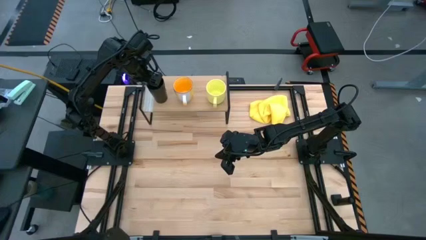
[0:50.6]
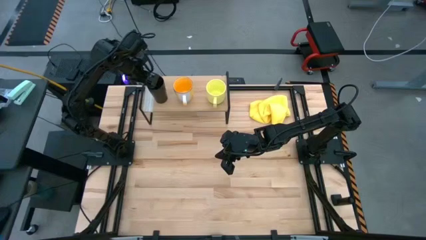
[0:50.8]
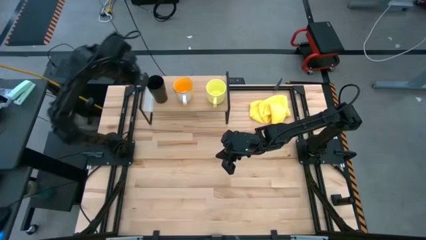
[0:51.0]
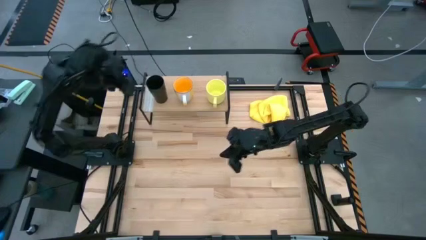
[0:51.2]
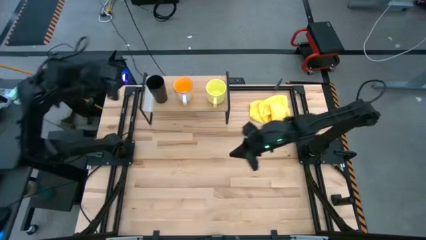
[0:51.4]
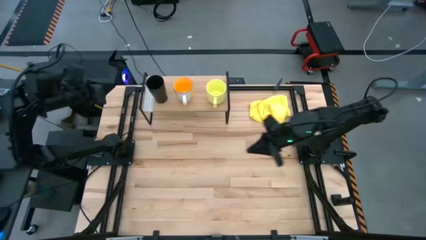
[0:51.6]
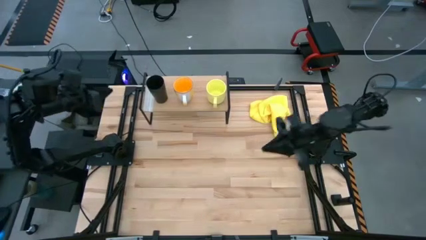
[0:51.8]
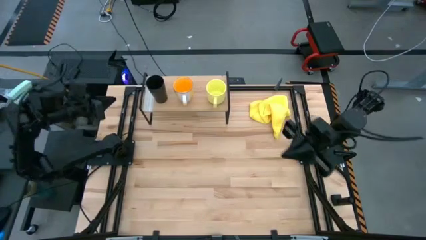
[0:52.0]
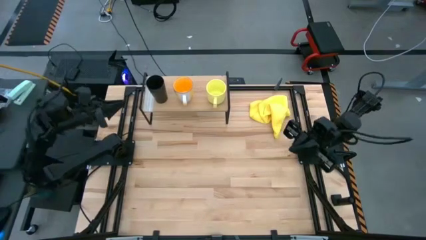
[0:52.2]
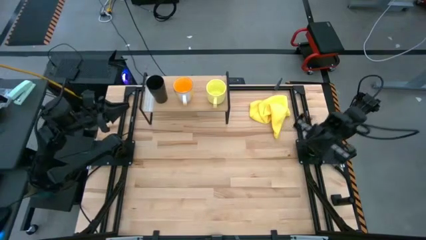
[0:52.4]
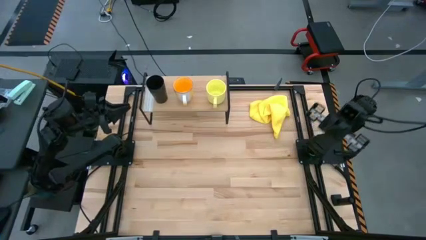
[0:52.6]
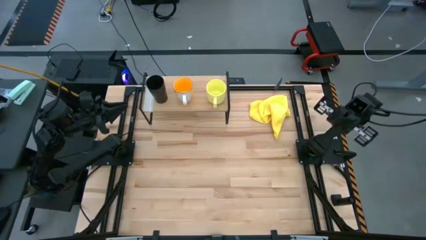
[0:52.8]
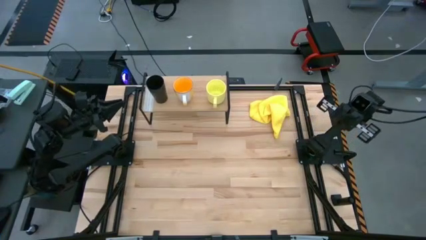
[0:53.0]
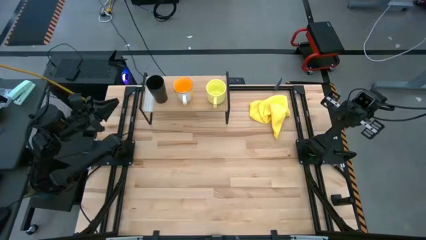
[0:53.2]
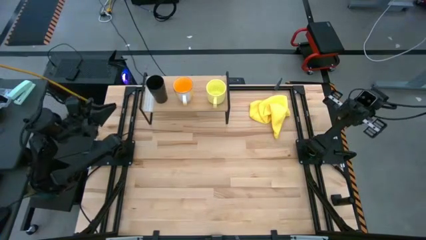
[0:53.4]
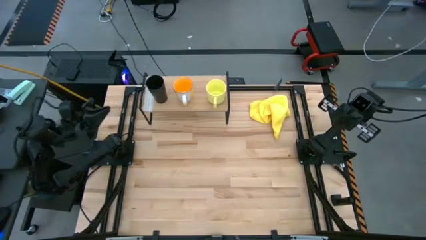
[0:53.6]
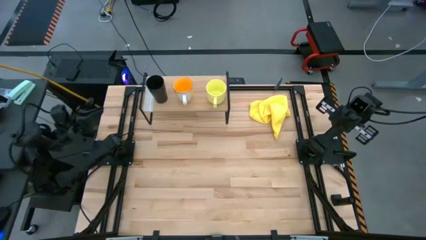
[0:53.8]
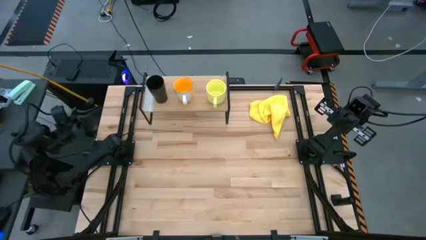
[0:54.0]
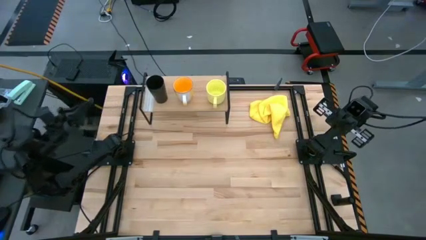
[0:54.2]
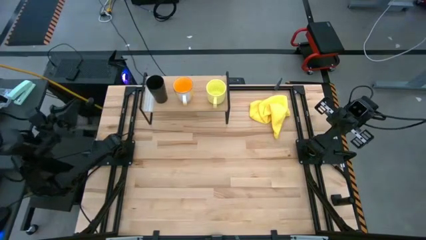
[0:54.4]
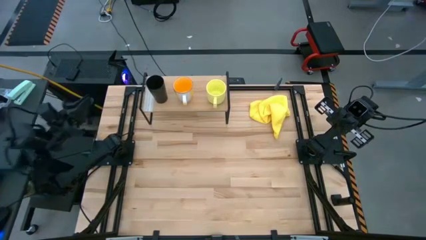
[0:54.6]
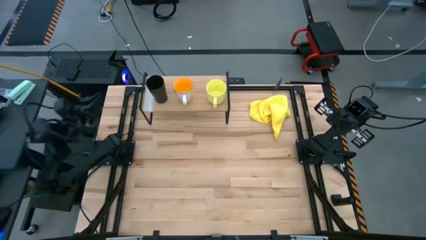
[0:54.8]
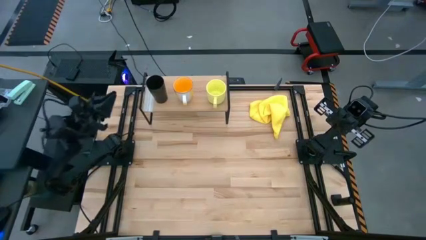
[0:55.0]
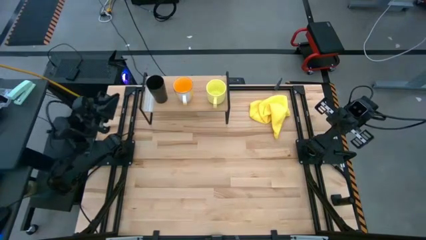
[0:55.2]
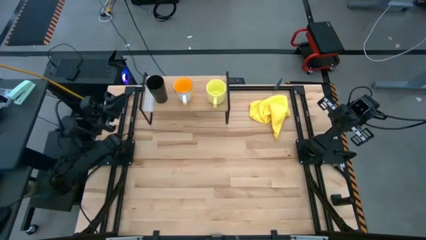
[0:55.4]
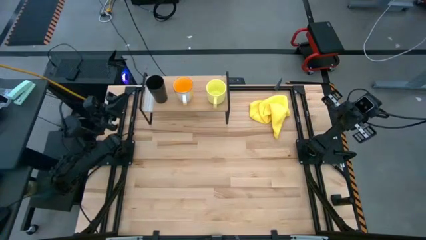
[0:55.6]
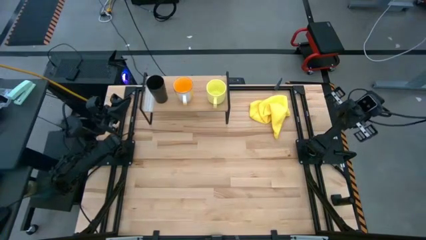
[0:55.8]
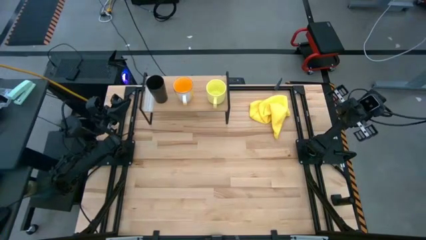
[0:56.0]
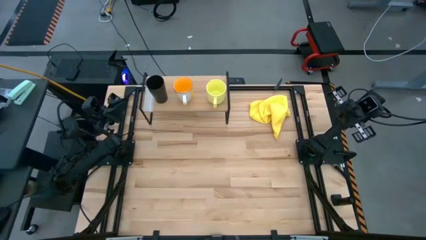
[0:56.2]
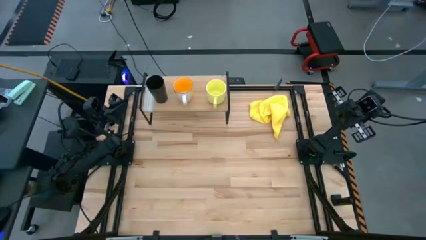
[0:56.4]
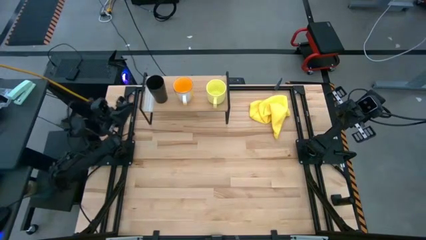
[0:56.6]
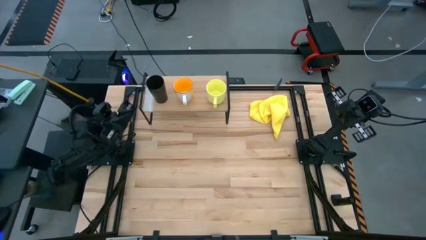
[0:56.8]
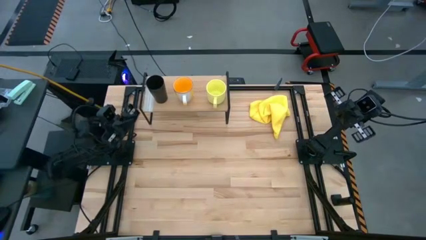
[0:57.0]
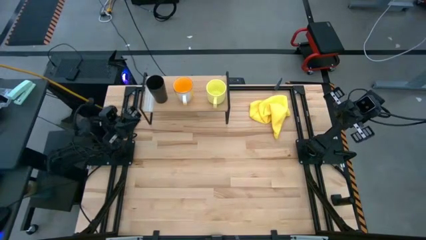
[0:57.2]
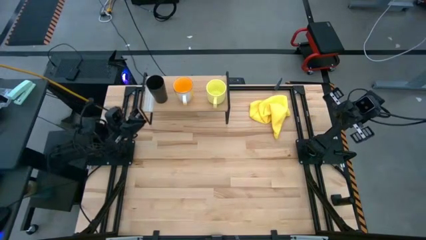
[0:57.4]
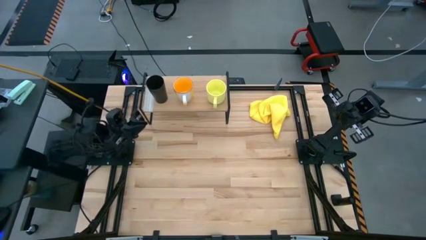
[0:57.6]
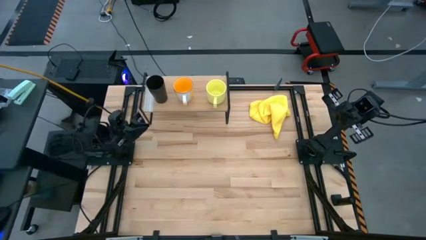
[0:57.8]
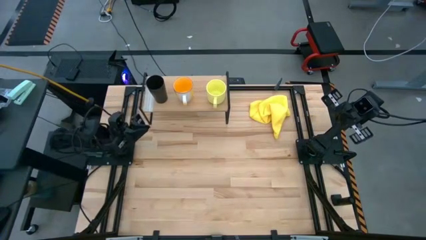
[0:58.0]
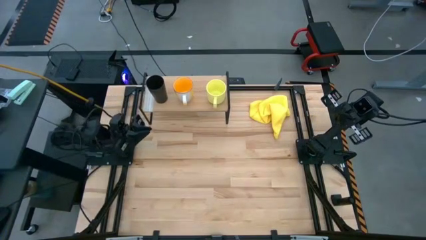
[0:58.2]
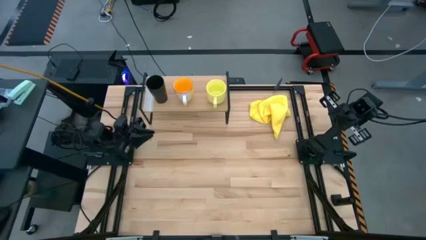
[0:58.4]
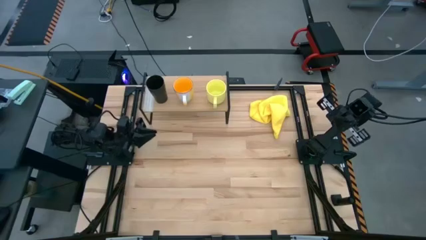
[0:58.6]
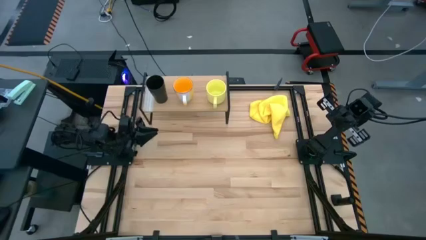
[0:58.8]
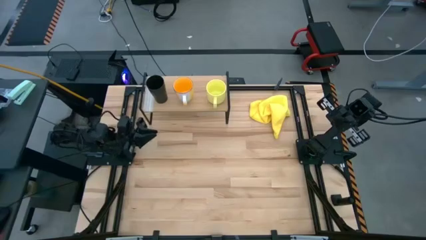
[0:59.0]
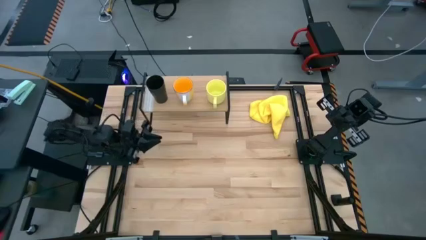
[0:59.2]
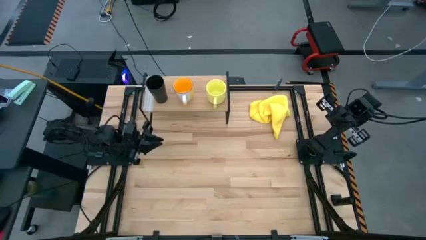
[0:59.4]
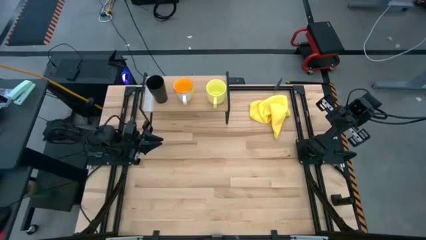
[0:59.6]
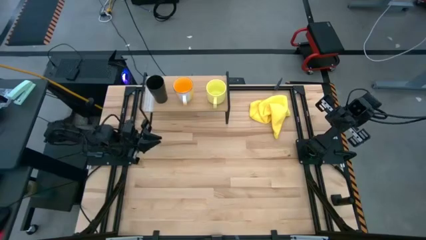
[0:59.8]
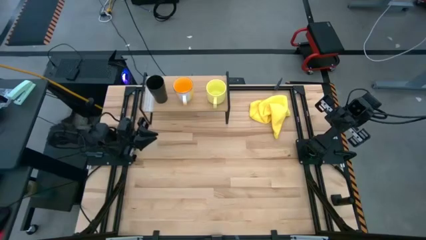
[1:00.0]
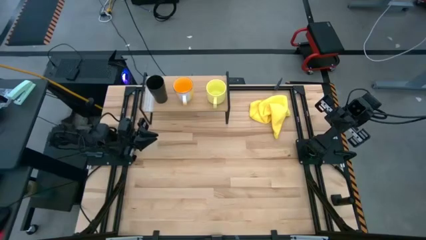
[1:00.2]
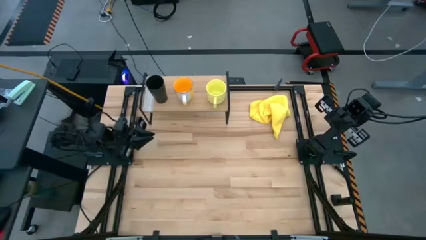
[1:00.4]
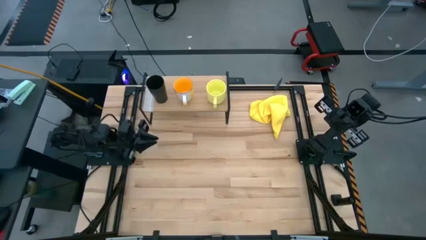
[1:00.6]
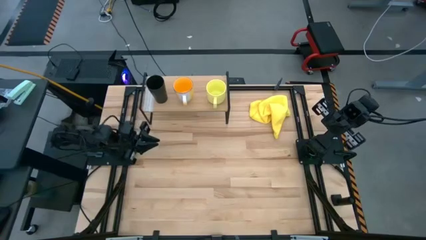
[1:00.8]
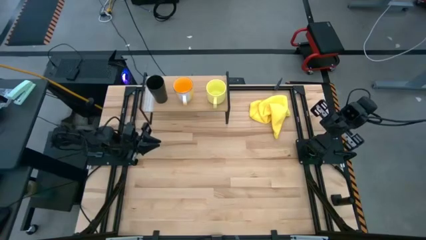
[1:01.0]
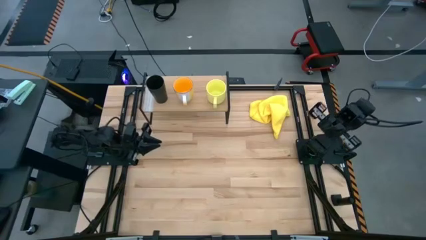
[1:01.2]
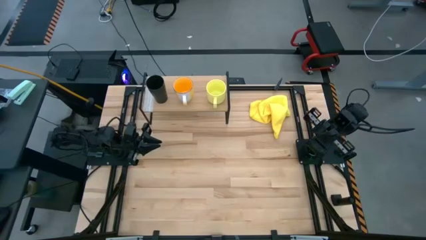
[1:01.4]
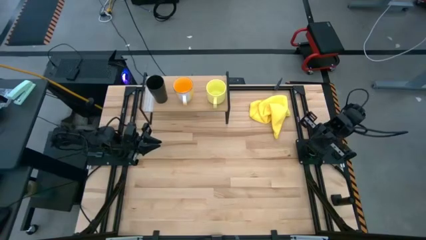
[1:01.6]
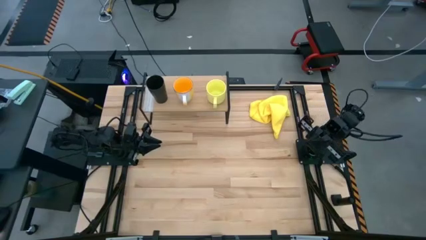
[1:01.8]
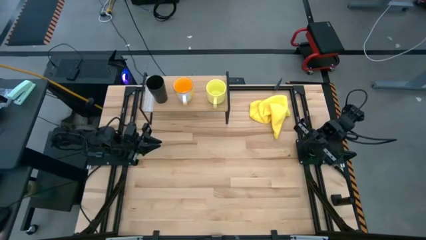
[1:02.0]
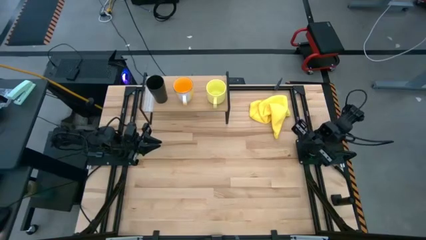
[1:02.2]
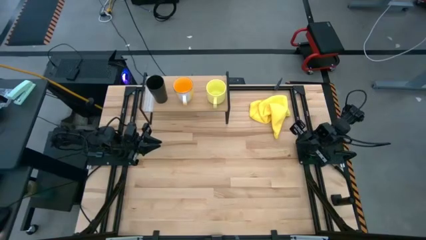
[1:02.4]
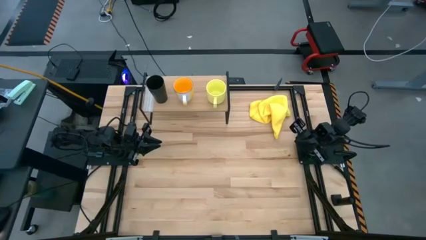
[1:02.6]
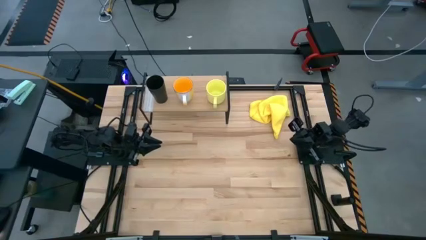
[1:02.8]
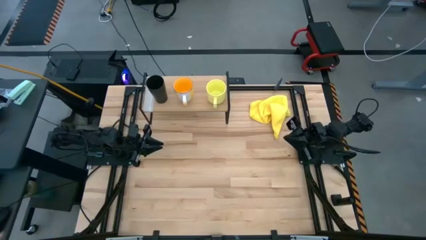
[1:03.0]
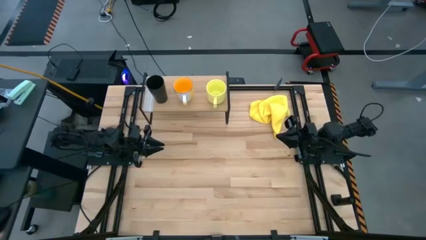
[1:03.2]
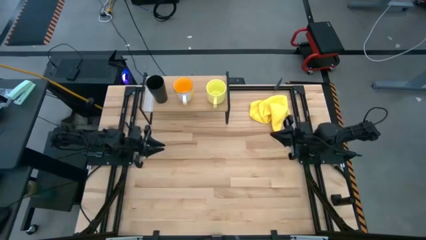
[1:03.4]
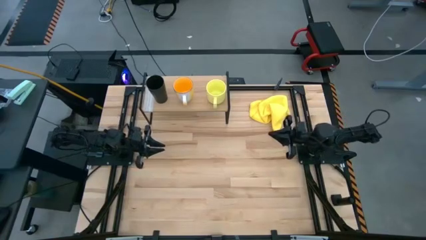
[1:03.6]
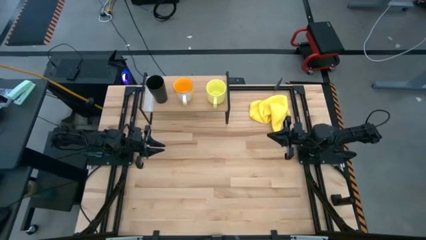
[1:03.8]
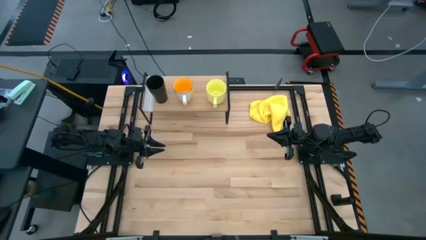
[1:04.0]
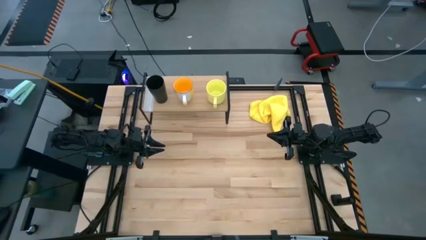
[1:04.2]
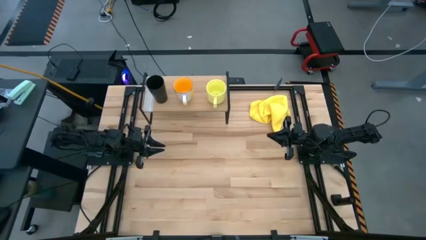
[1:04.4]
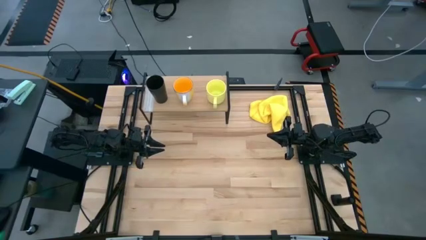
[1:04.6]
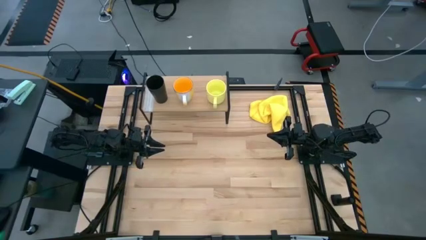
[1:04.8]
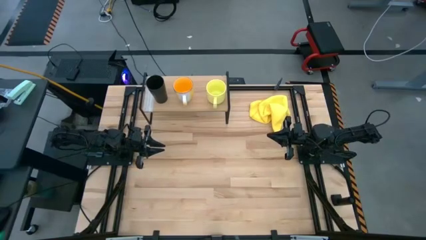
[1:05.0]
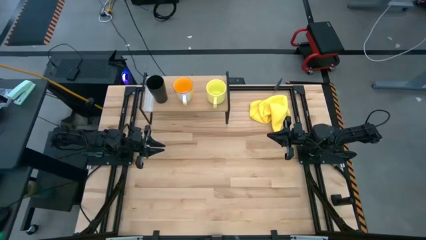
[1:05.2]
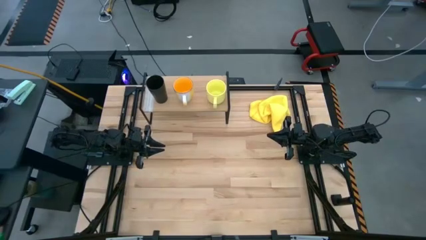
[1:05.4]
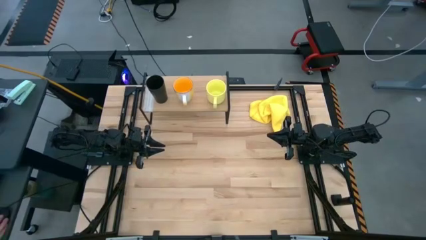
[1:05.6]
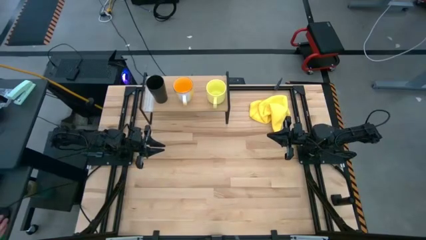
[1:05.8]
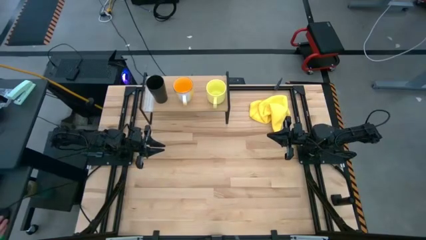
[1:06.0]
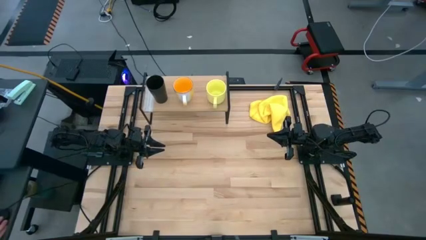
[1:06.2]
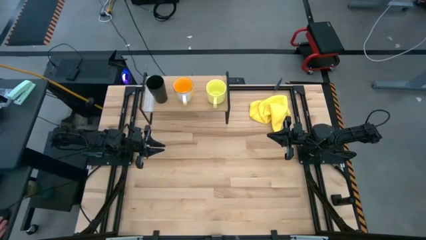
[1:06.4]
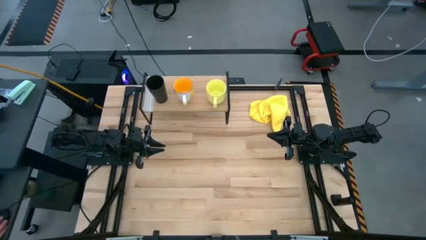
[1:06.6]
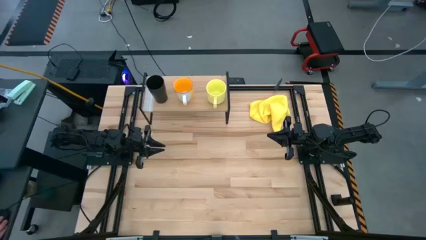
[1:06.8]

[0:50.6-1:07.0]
Task: Stack small to large cups/mugs on shelf
Return to Home Position
